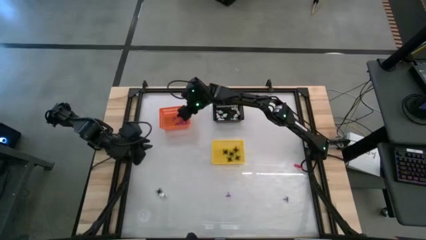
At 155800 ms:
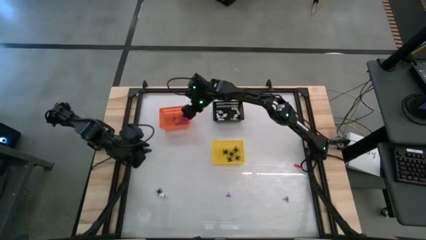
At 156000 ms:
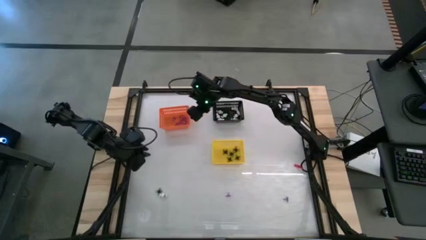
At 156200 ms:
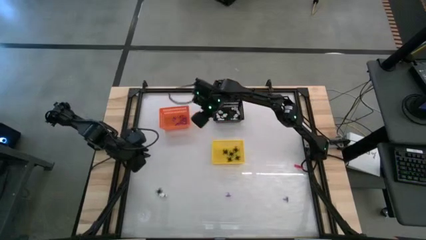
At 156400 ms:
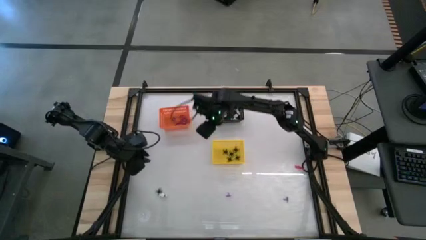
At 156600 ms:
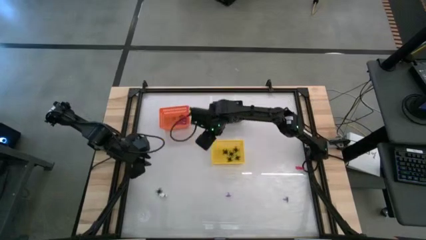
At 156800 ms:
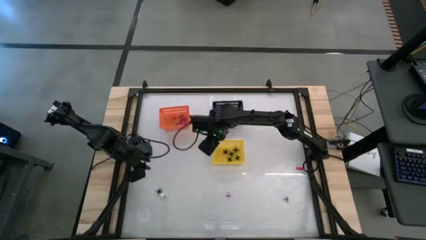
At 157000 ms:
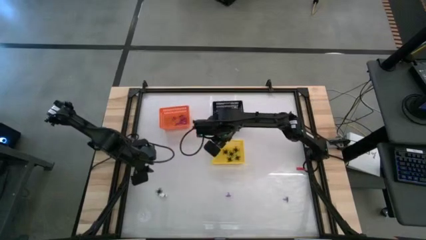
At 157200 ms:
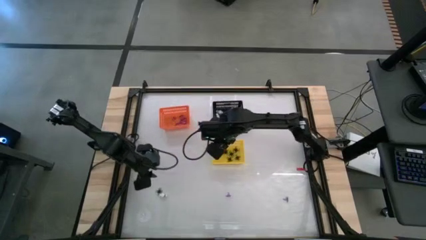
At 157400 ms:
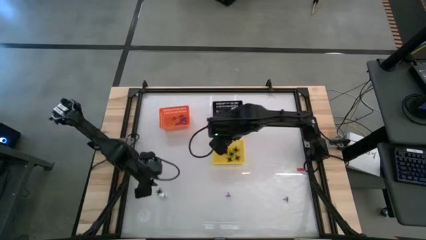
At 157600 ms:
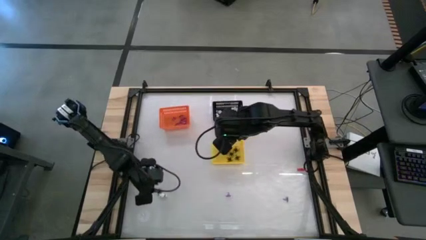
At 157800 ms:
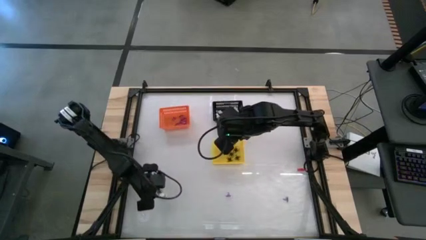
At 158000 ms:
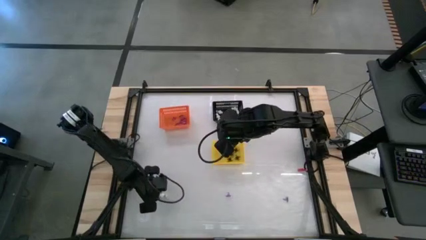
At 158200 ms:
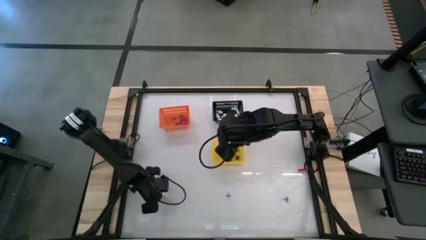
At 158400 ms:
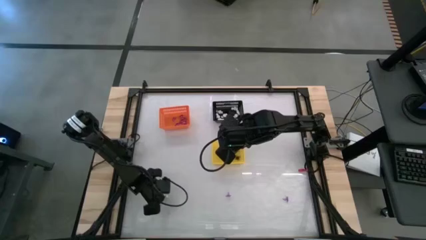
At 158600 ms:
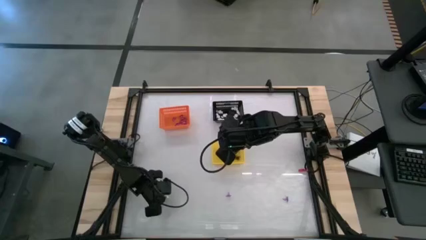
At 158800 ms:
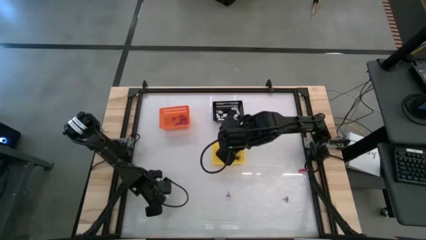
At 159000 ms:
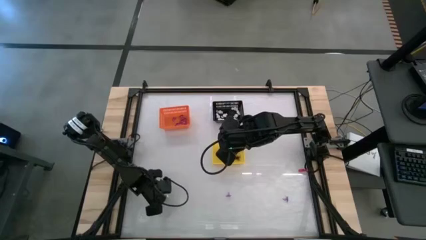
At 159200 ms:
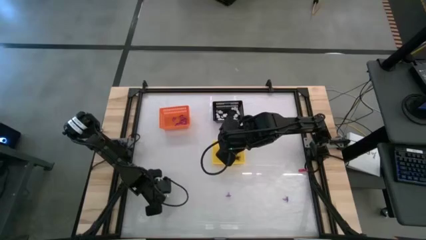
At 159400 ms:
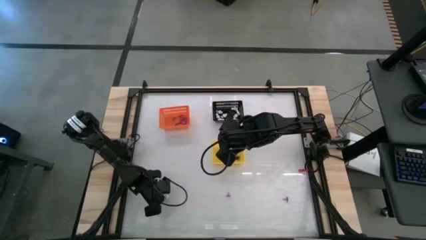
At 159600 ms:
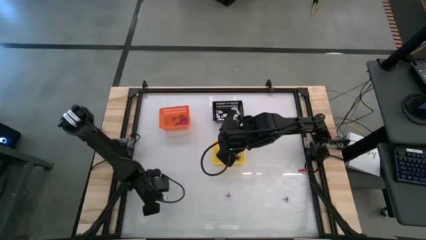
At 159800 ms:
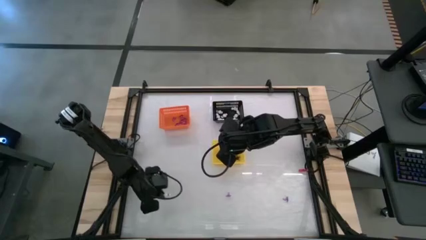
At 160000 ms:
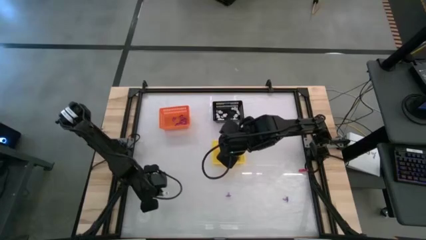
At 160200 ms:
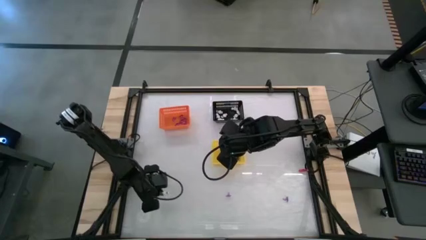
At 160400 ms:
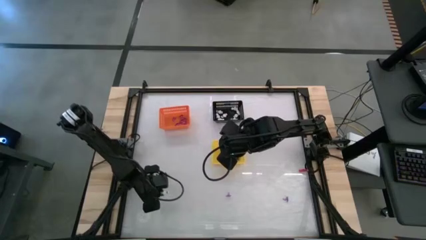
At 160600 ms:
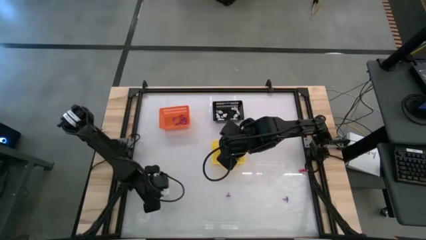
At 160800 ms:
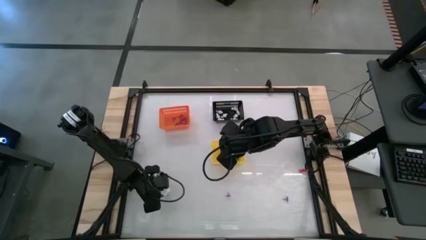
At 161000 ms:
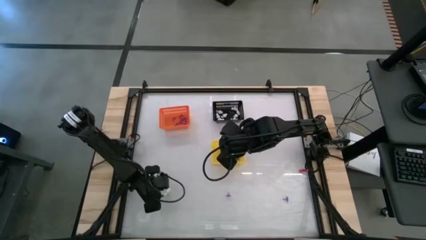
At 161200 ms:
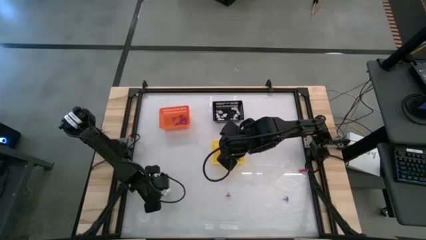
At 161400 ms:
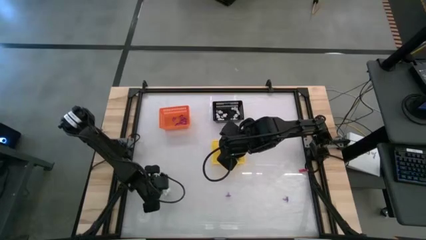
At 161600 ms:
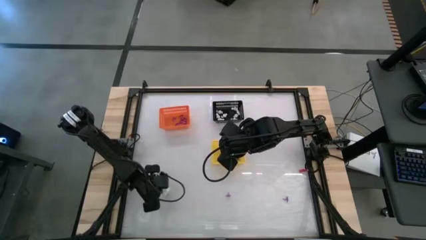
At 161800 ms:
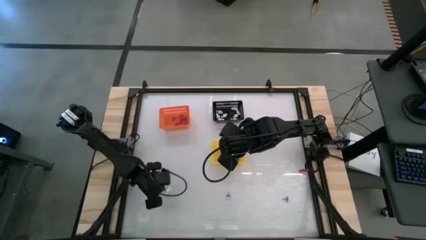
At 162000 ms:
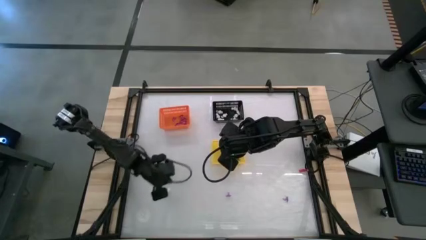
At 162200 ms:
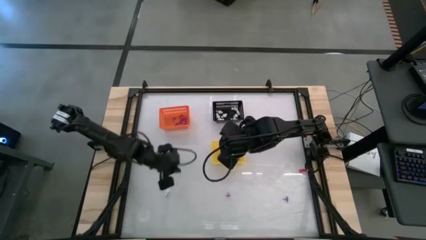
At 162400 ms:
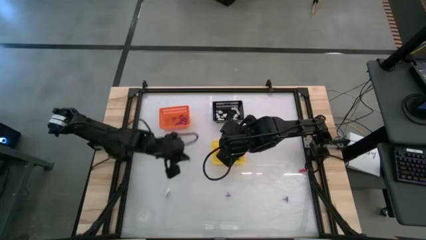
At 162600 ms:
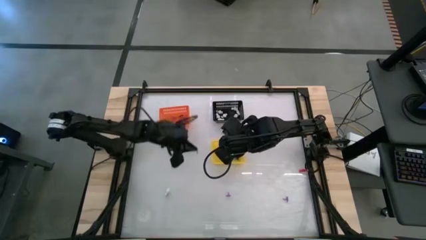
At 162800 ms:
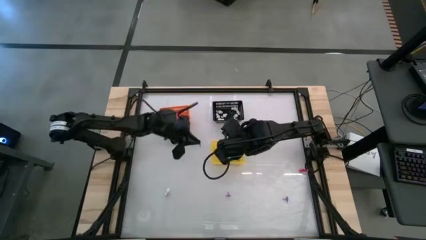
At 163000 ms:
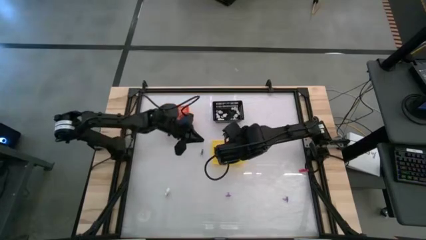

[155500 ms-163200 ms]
Task: Sort Halloween decoration
Put the black spider toy into the yellow bin

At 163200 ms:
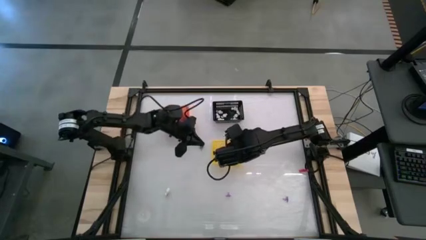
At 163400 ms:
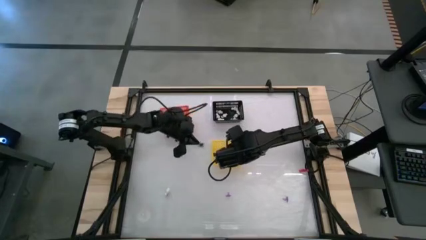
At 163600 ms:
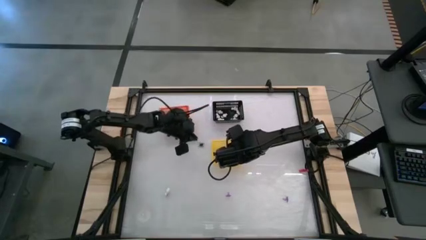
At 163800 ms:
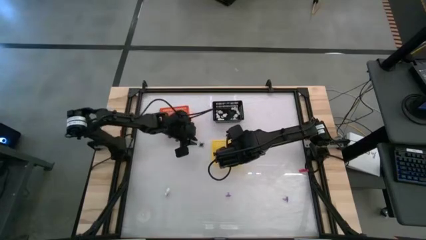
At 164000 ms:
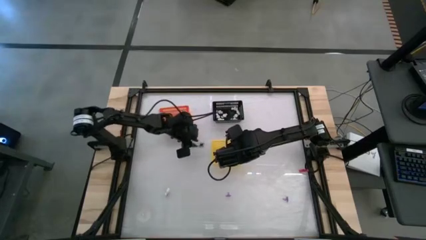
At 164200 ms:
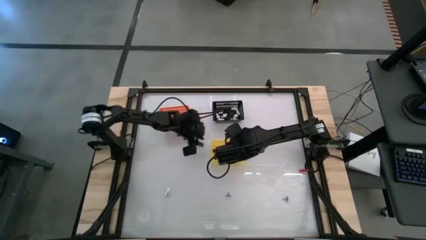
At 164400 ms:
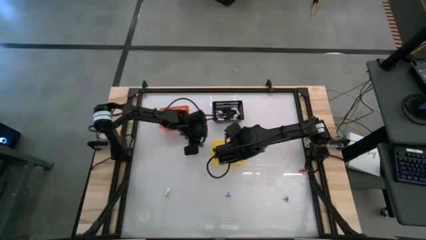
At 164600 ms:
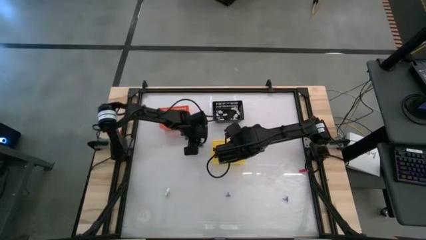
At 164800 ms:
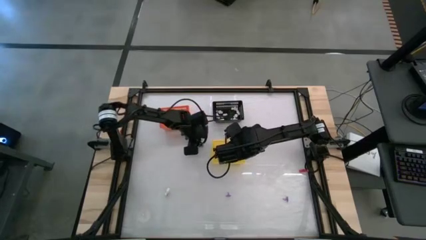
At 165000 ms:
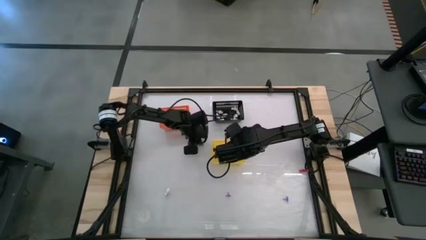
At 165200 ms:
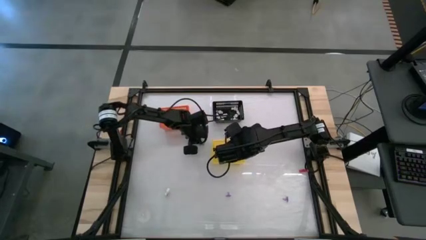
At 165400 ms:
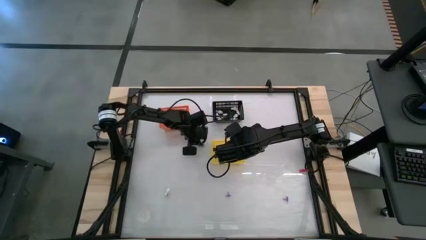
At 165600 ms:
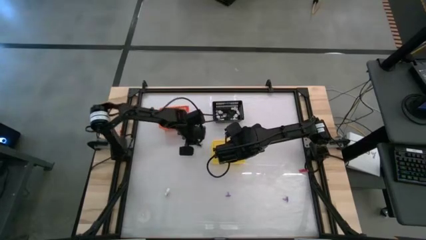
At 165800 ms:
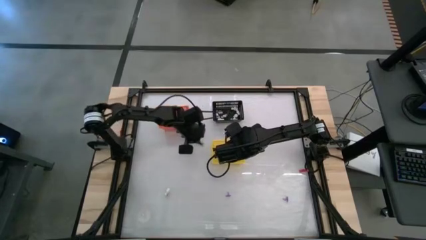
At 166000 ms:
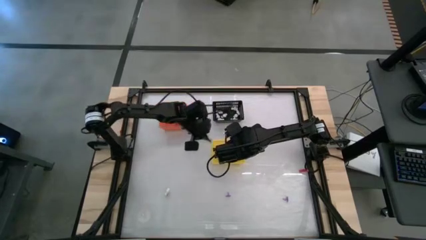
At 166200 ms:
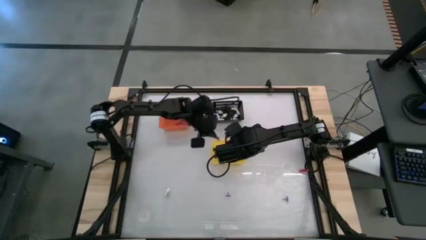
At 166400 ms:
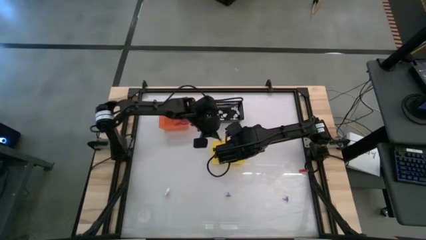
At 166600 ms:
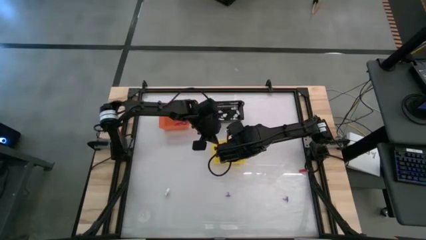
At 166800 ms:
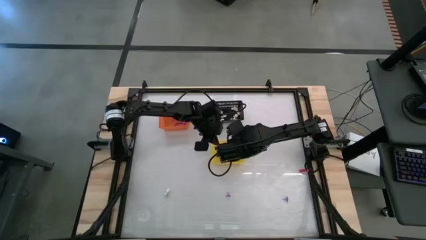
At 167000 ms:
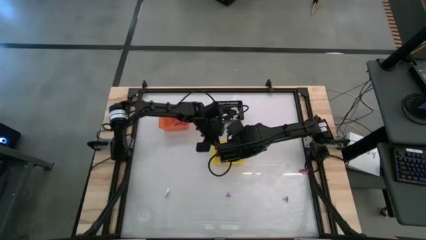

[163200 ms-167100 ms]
Put the black spider toy into the yellow bin

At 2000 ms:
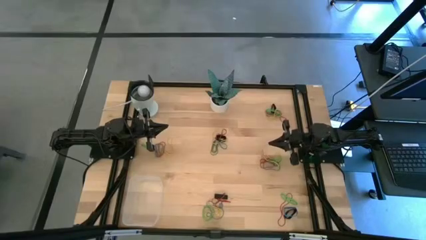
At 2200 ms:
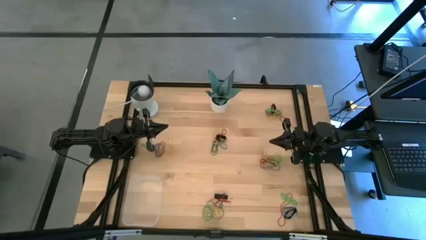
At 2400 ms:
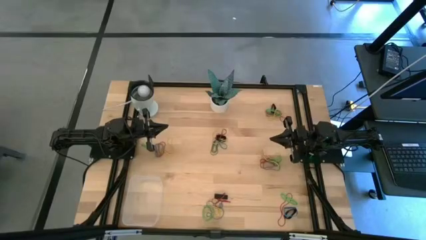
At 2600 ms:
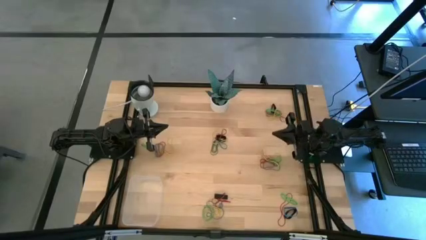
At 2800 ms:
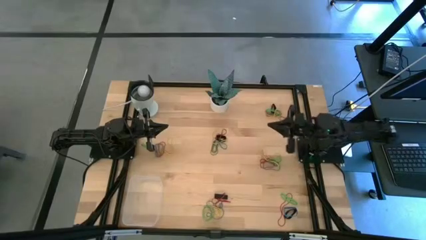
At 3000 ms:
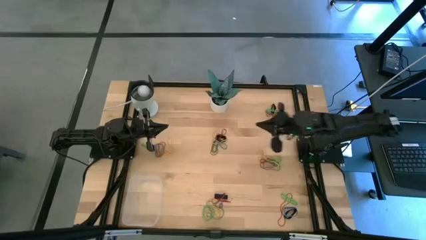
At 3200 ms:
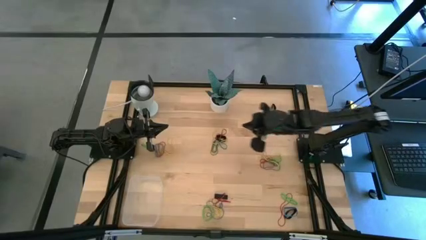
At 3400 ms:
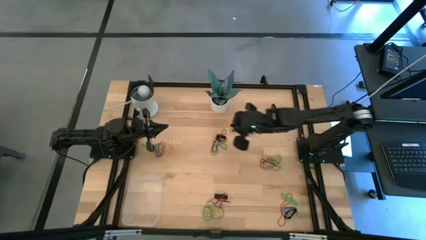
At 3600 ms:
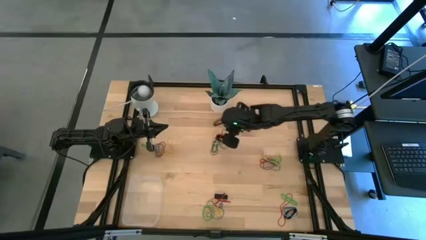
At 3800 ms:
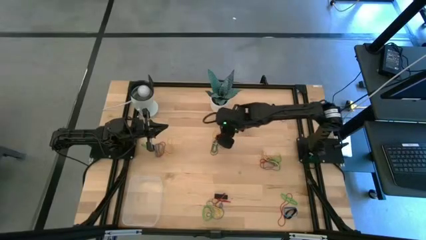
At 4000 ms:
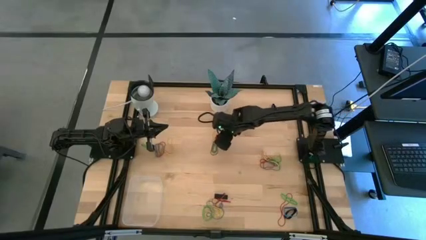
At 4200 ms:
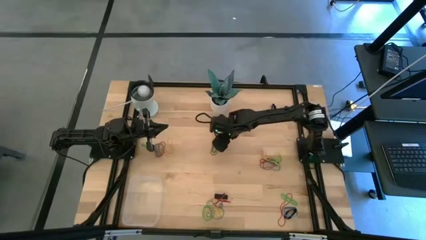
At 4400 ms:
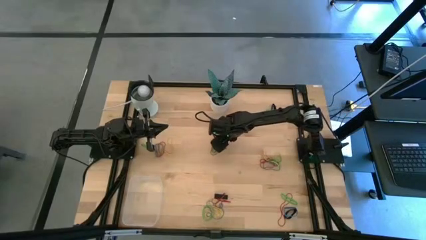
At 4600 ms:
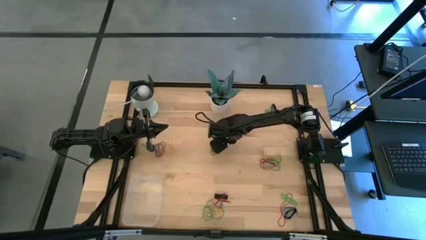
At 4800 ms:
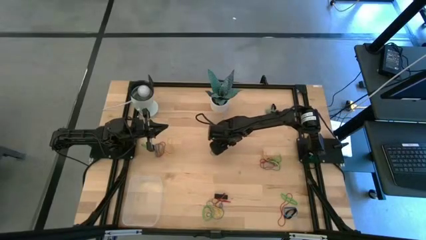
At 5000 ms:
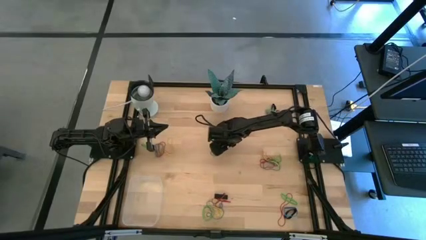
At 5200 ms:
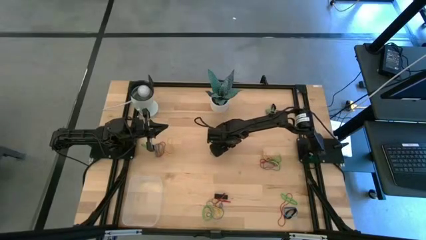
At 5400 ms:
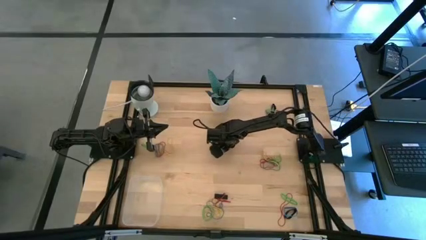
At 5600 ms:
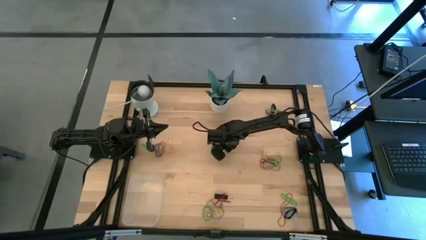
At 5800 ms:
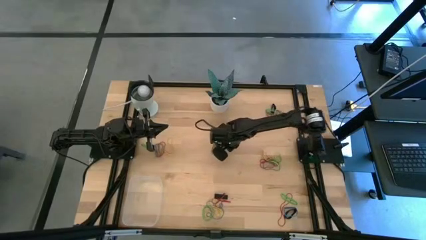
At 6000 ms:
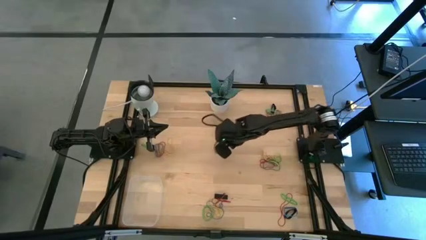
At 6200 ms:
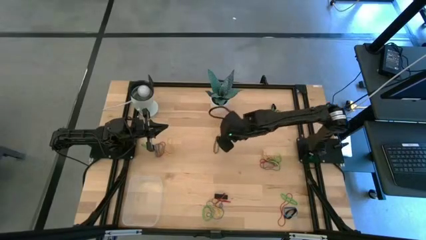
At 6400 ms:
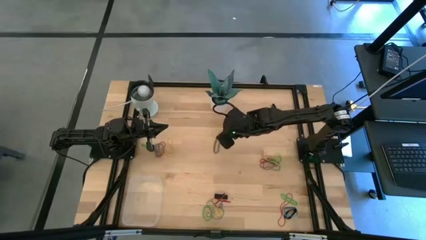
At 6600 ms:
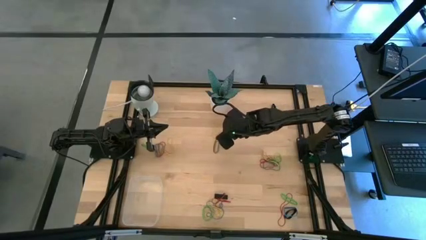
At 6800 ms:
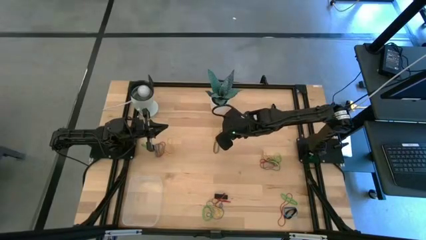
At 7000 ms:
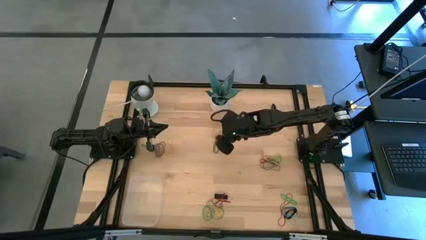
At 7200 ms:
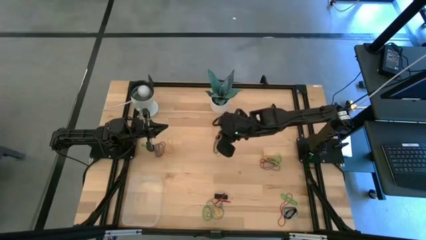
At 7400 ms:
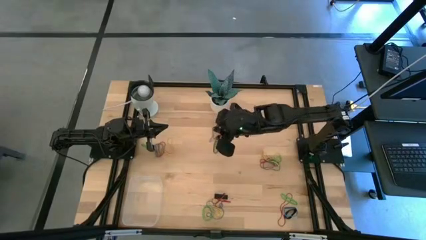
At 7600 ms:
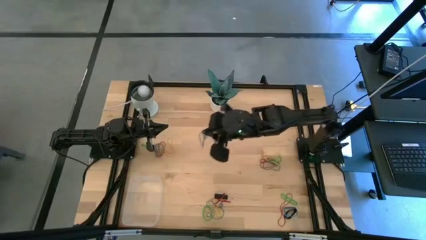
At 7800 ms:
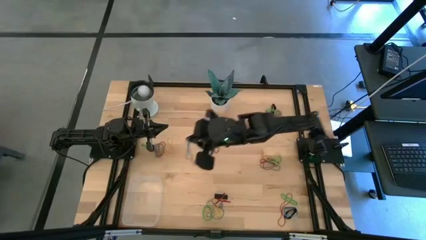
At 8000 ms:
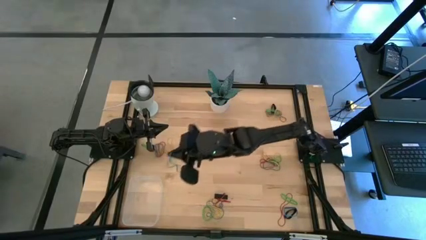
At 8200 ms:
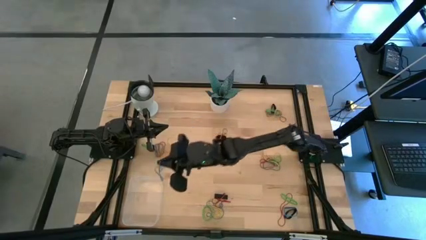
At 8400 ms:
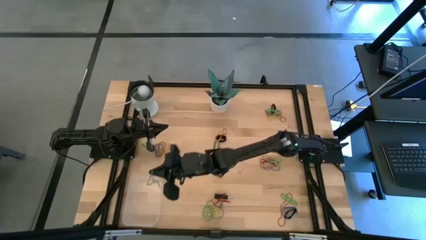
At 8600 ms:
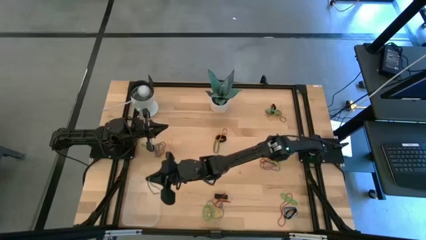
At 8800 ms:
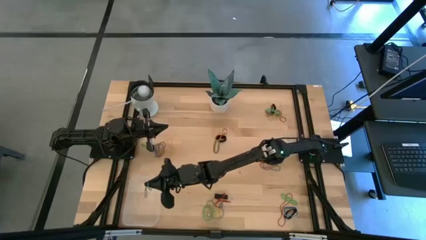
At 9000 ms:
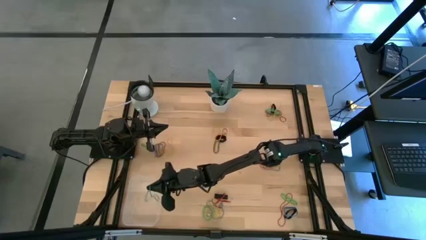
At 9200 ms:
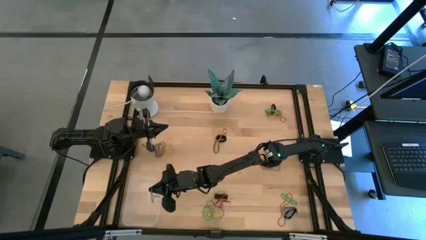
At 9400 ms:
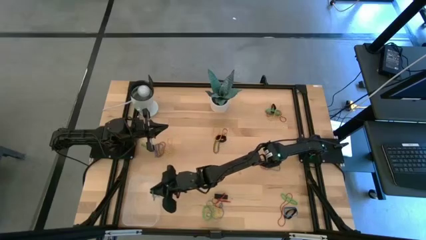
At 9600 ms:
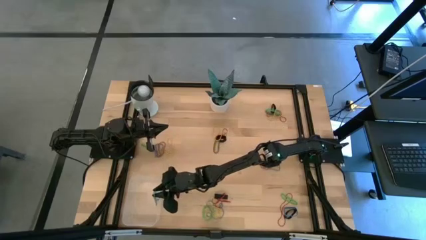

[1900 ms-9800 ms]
Task: Pick and place rubber bands into bin
Put the blue rubber band into the transparent bin
